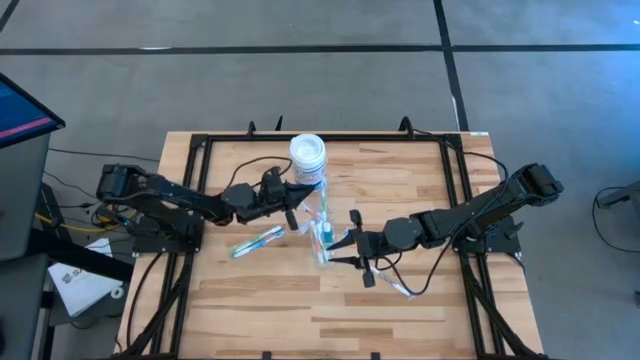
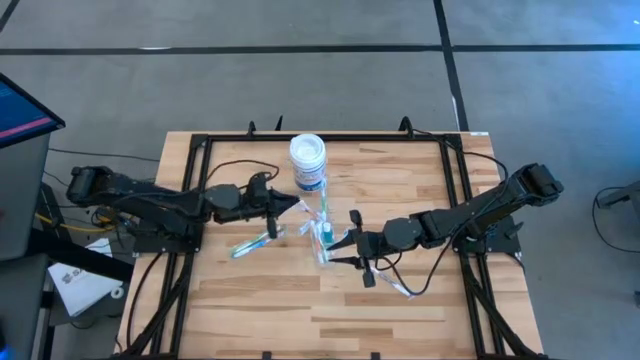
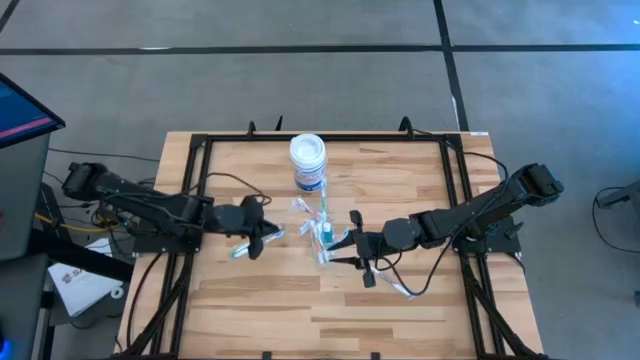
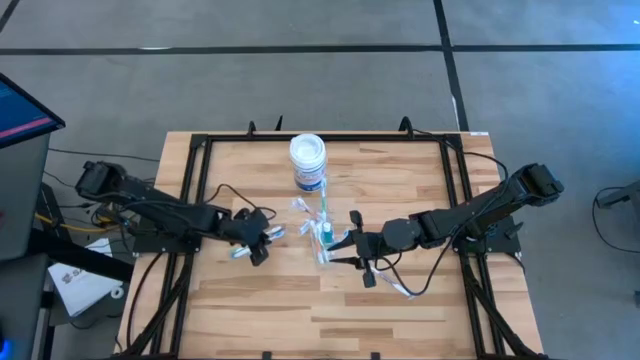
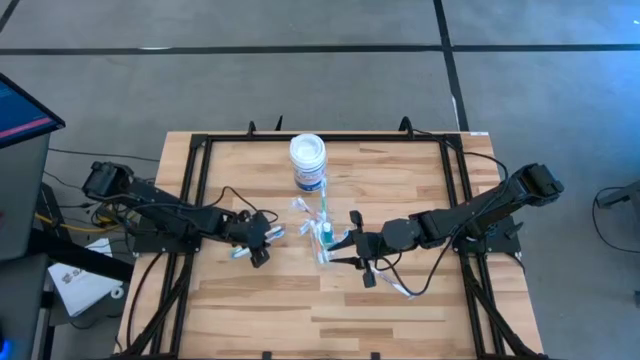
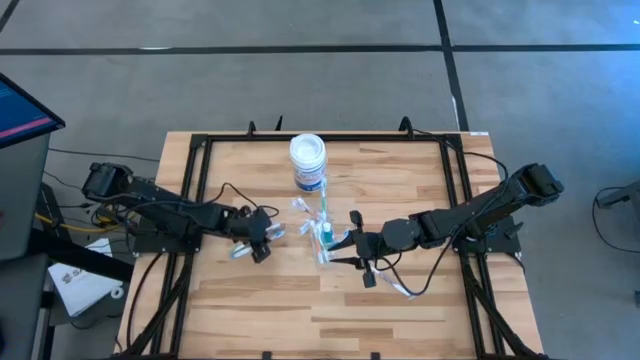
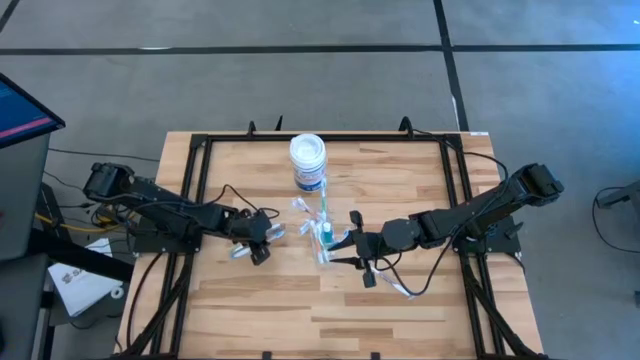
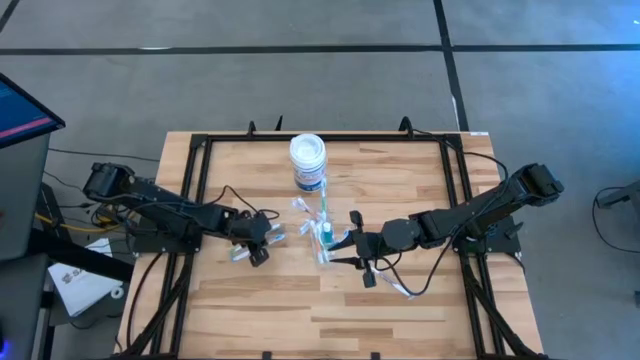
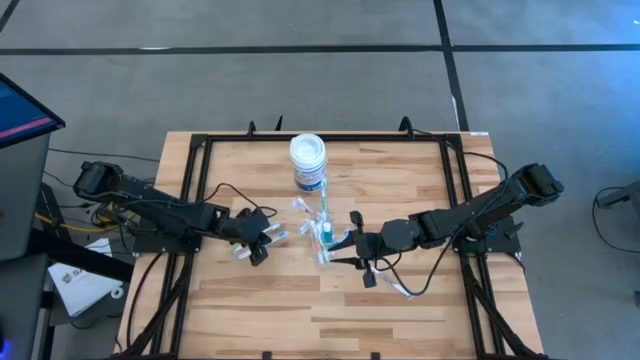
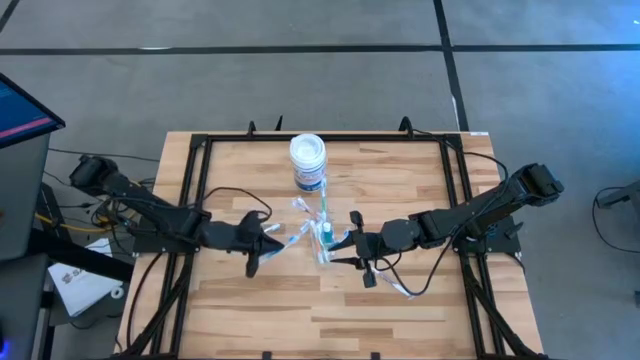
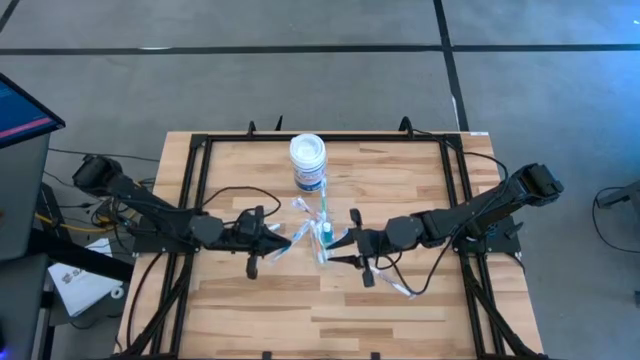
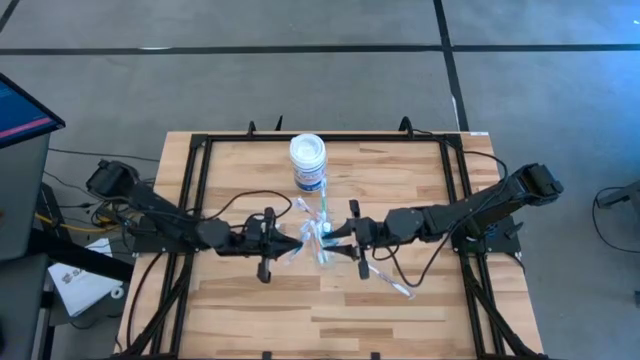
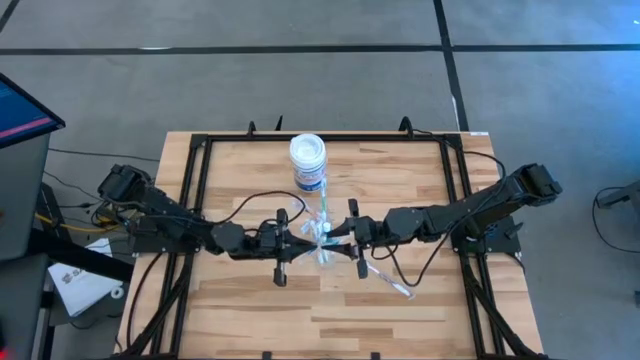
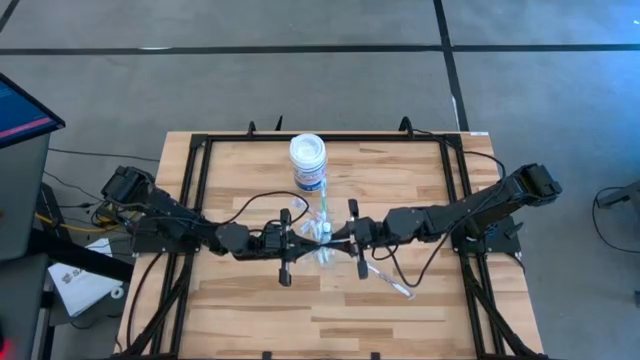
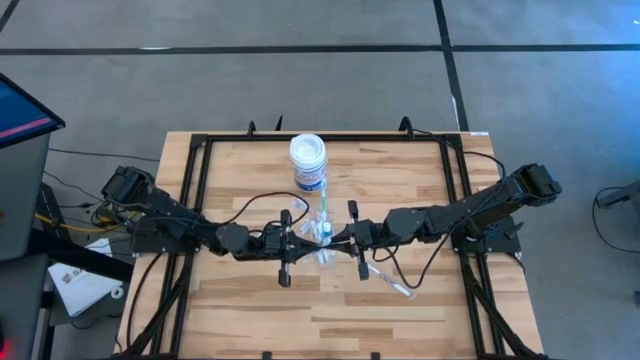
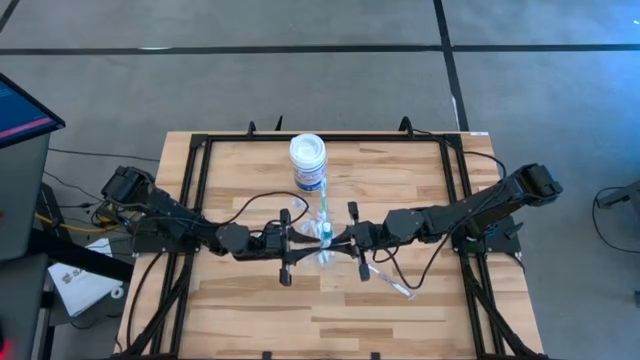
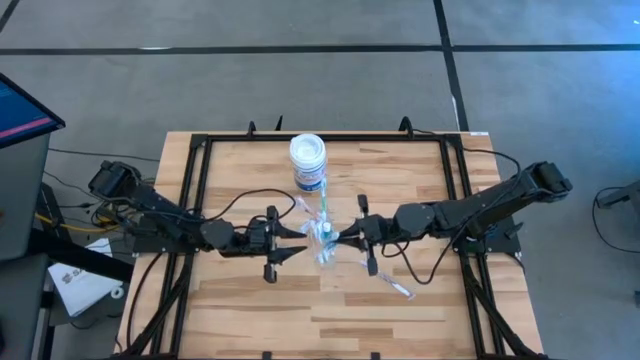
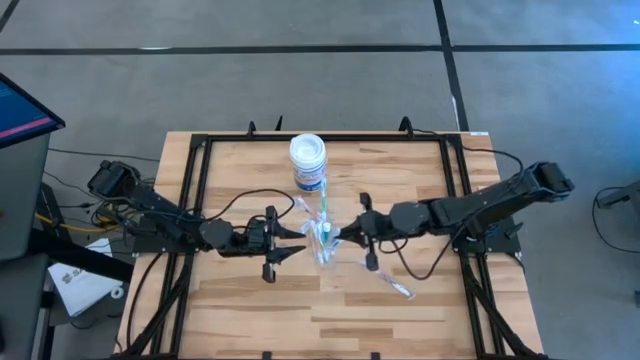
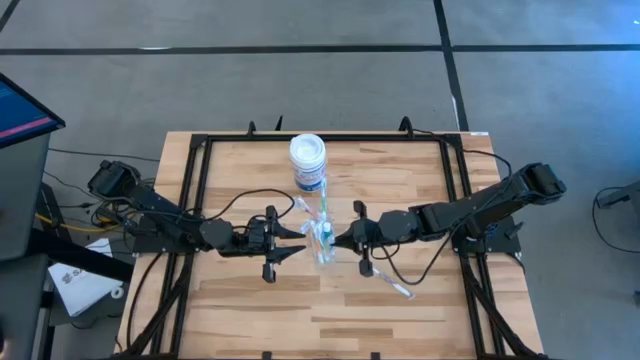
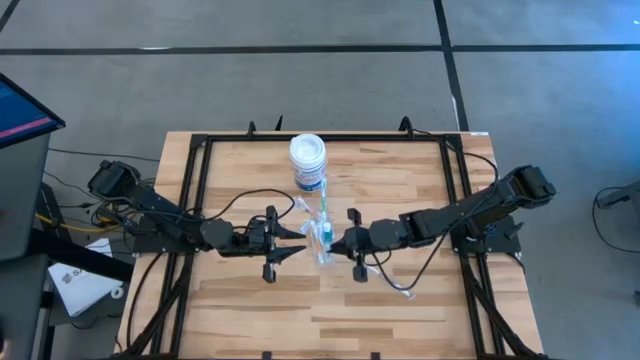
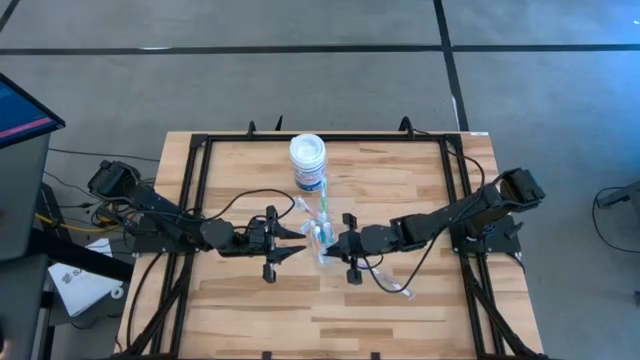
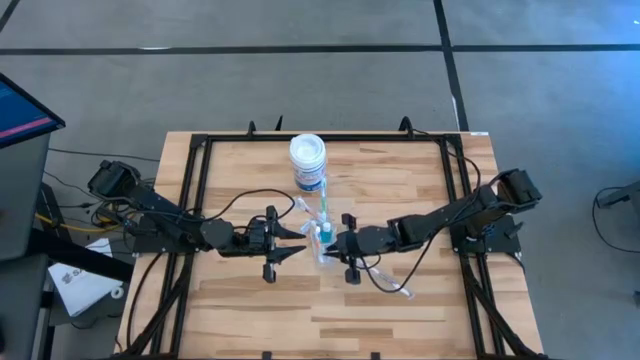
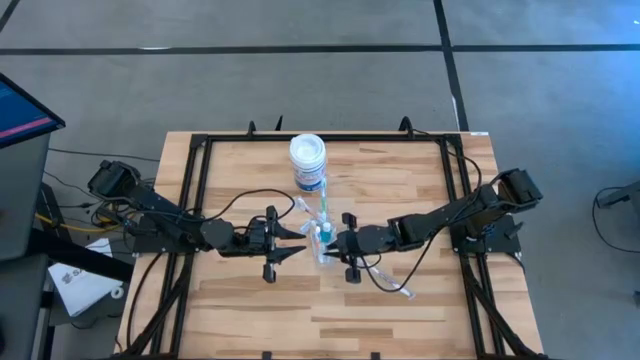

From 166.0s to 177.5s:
Task: Pick & Place toothbrushing station
Put the blue toothbrush into the Transparent organizer

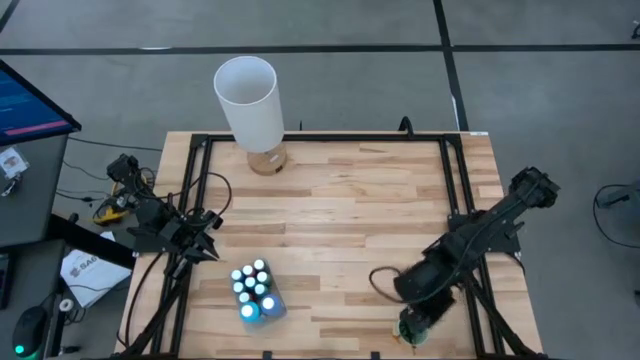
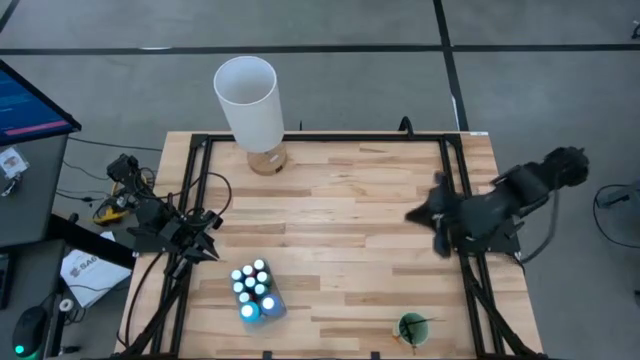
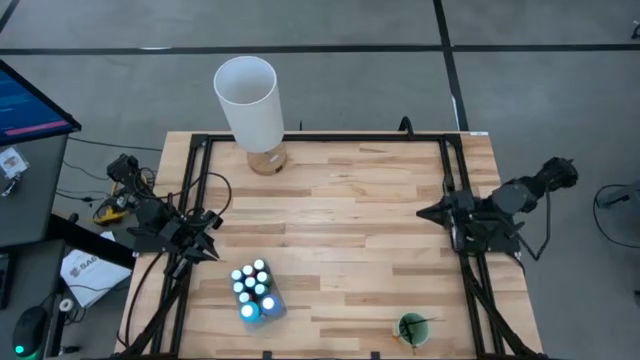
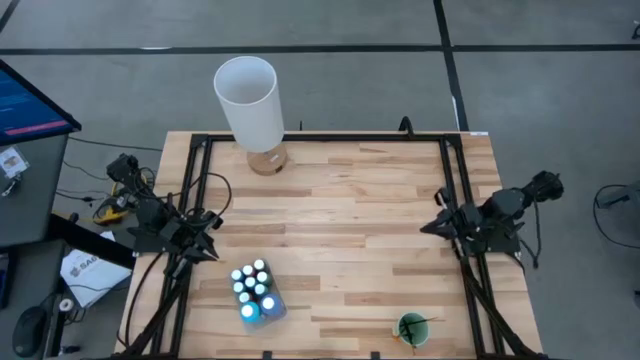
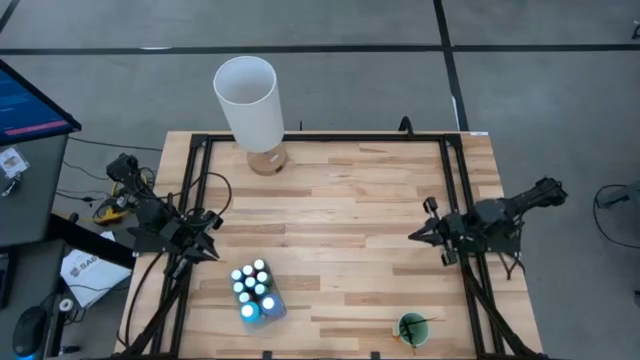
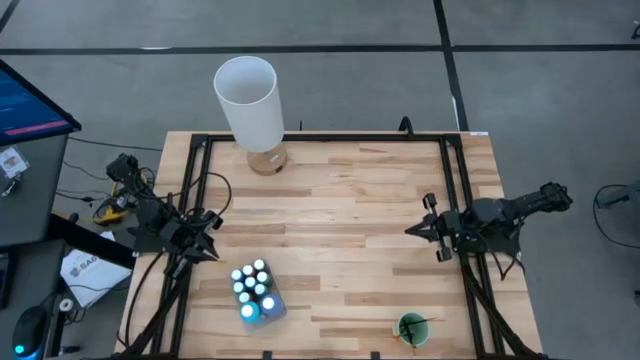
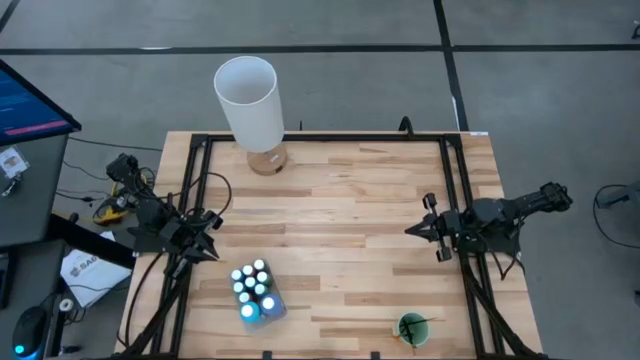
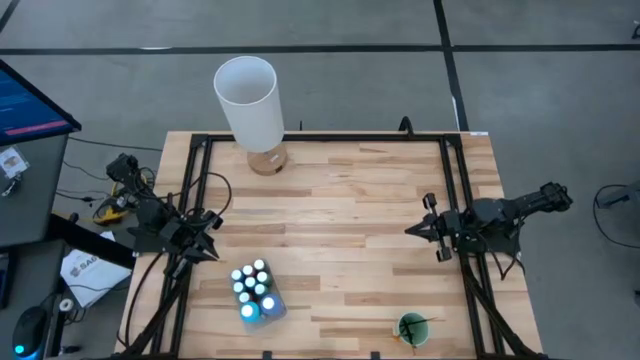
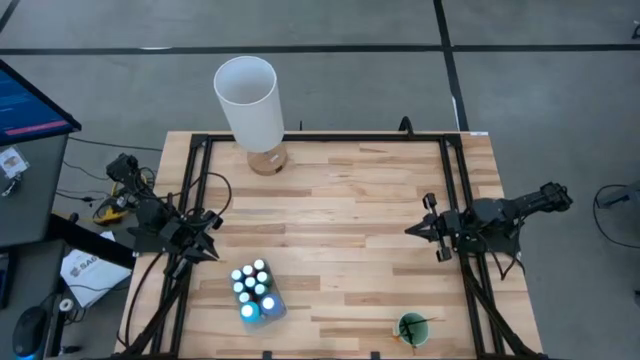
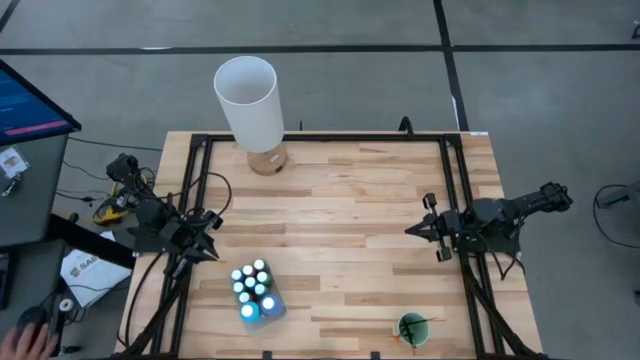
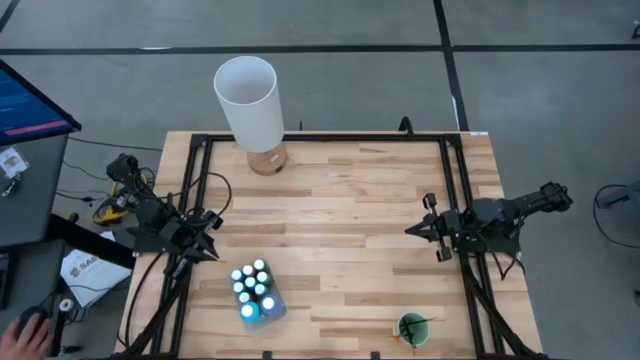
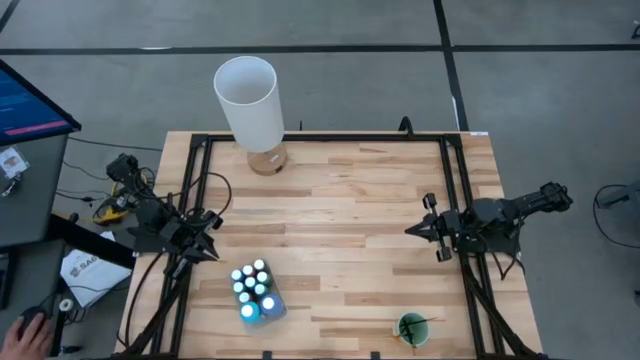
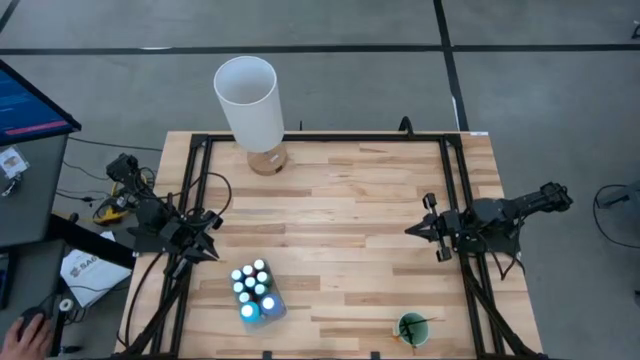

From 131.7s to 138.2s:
Task: Pick & Place Paint Supplies
Return to Home Position
